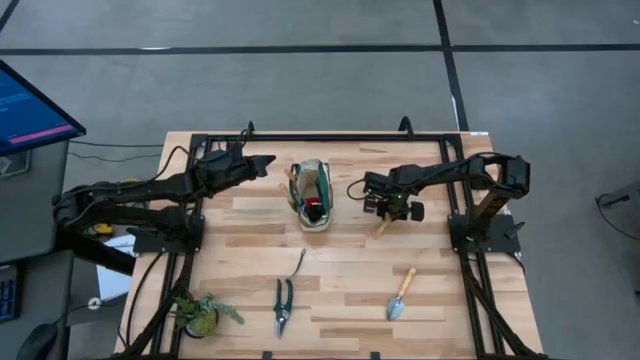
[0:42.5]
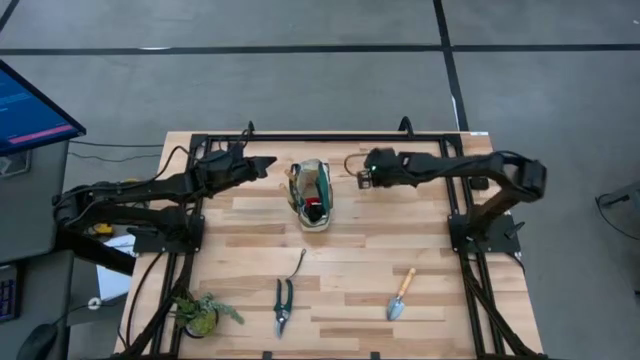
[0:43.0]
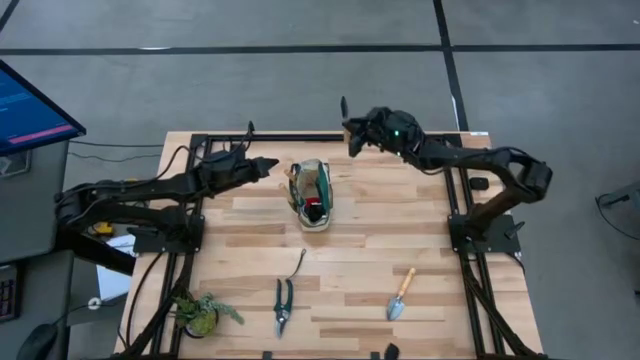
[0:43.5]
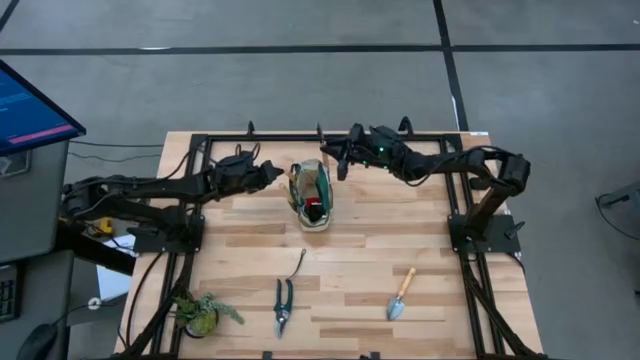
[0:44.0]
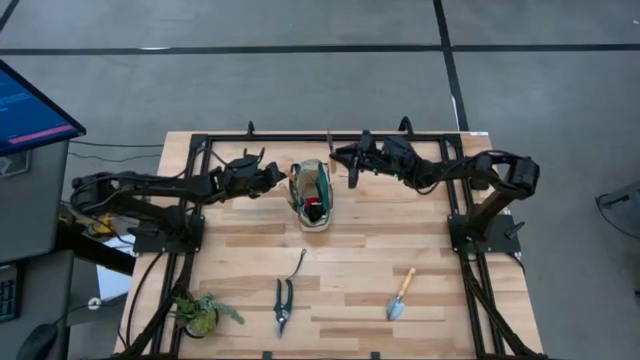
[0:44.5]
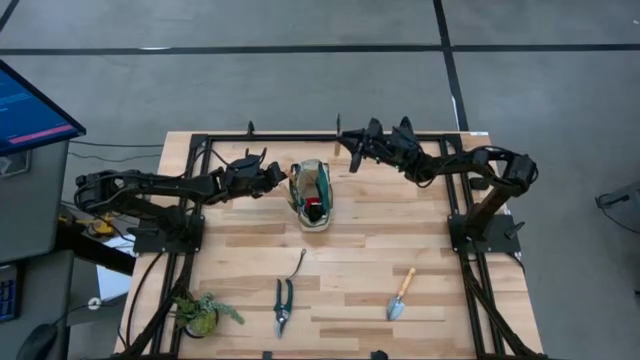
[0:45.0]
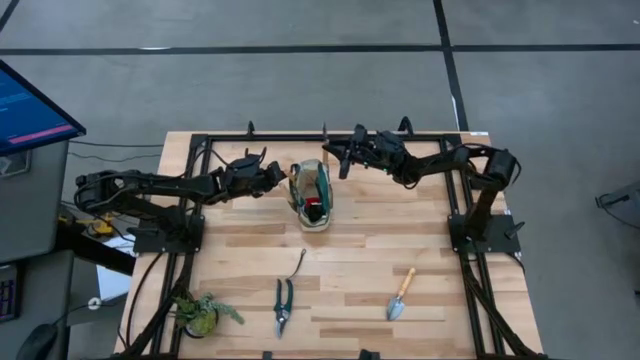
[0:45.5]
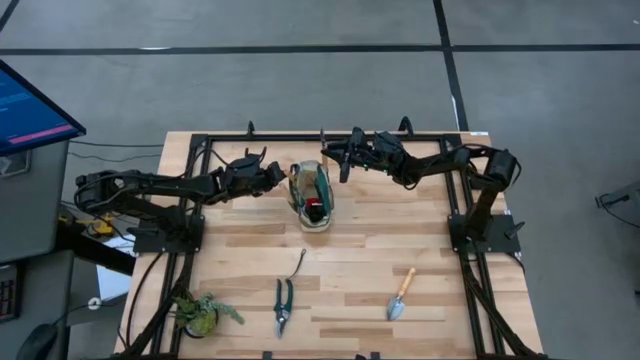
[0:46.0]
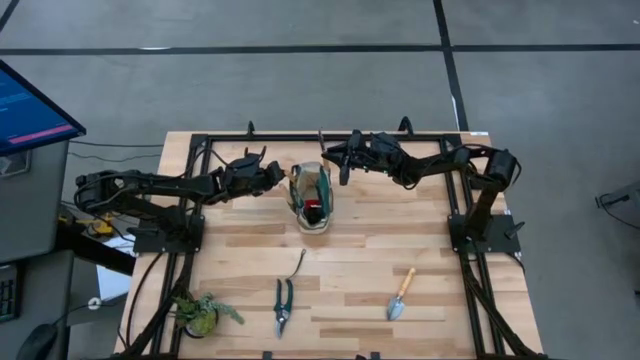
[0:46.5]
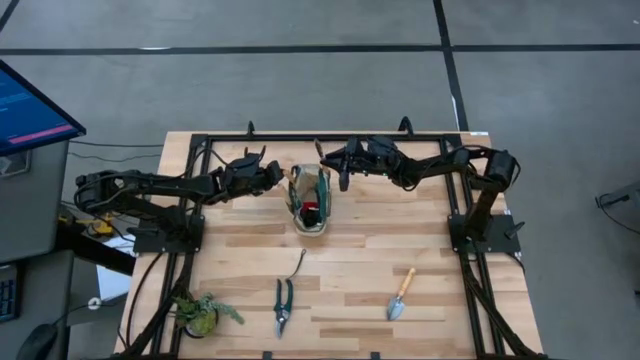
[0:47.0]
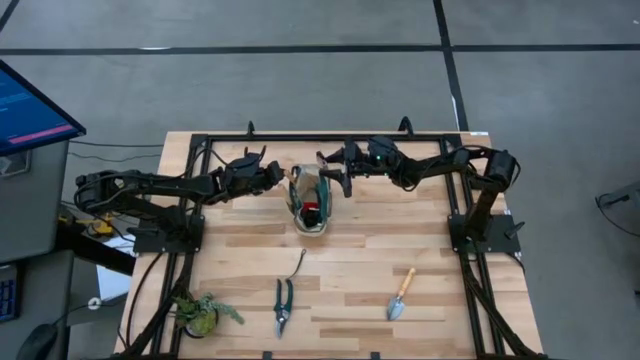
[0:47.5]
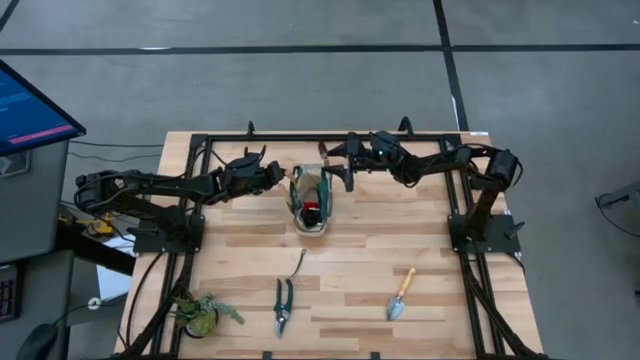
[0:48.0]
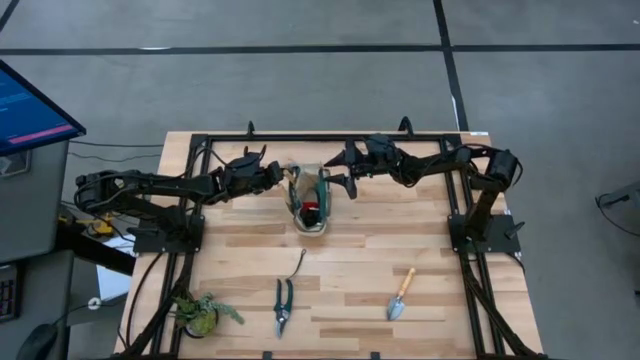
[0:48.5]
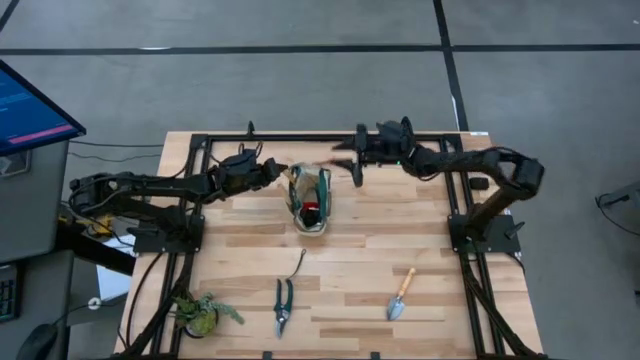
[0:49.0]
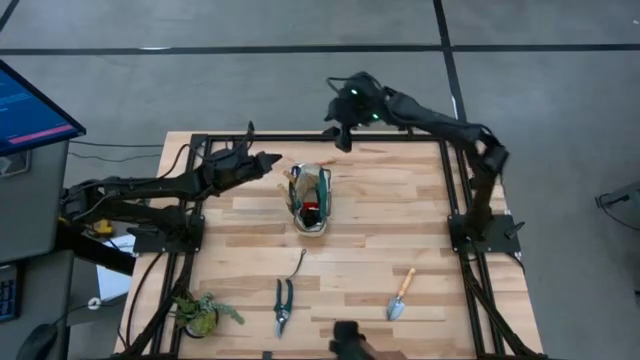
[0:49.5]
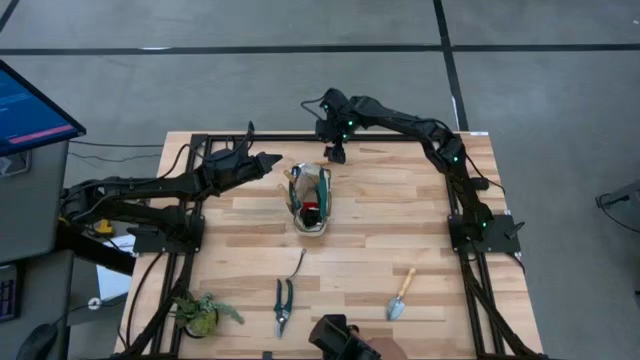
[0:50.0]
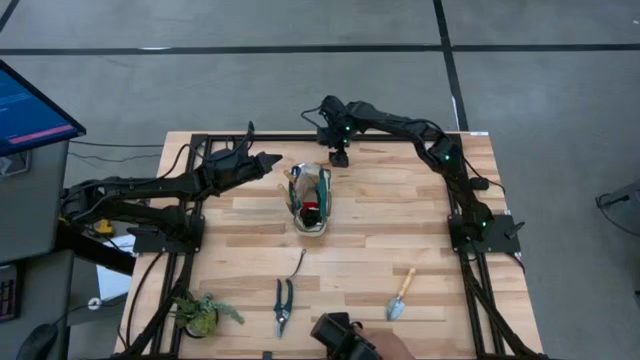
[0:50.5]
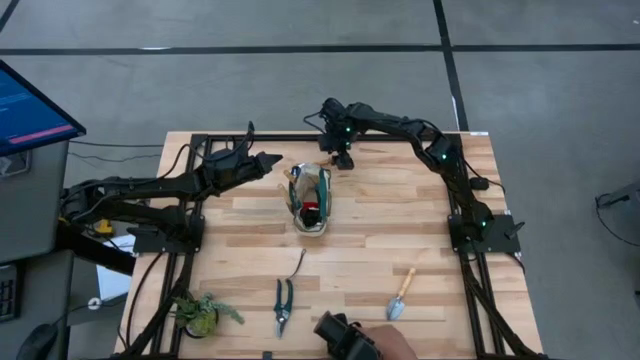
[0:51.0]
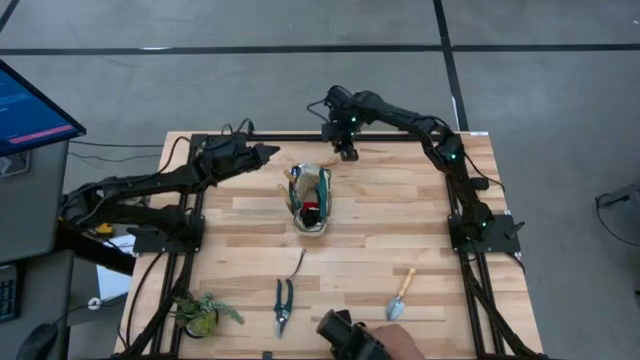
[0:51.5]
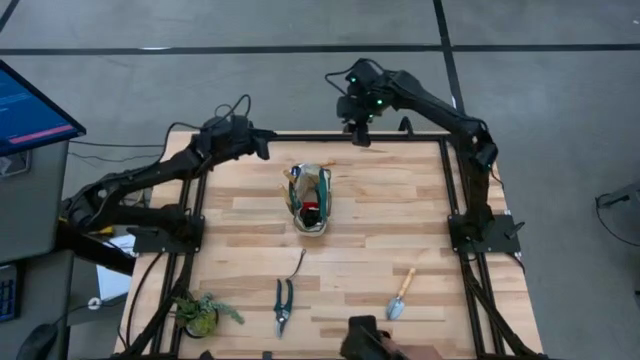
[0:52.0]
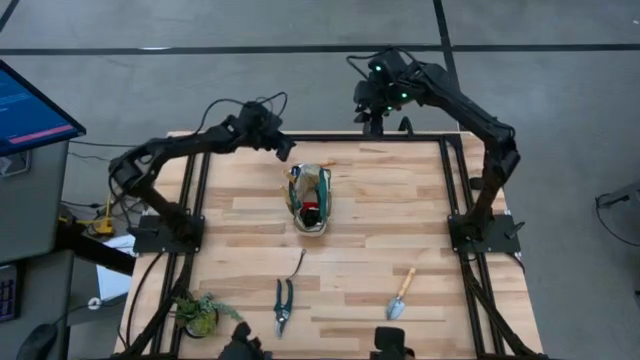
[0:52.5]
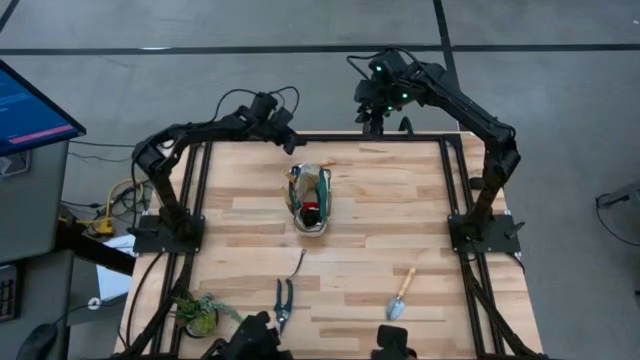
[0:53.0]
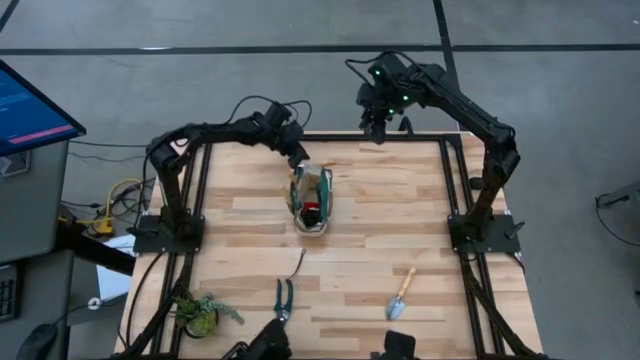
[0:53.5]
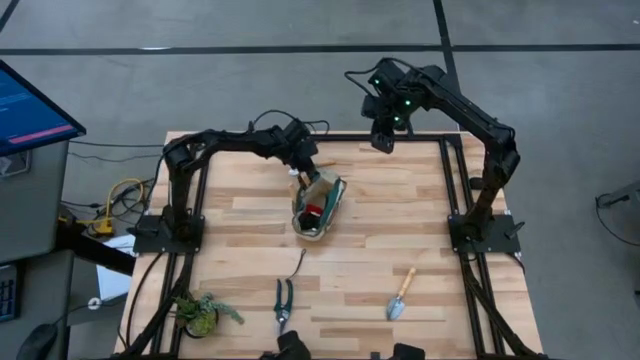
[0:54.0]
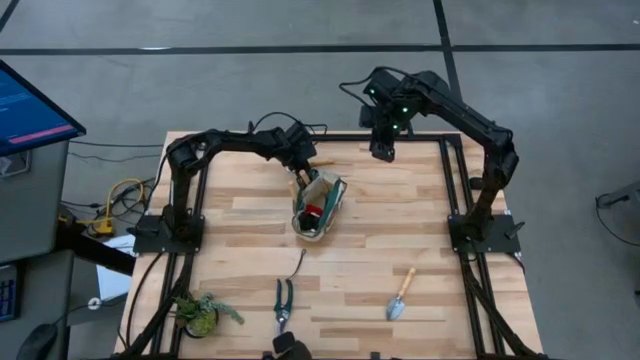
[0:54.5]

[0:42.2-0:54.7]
Task: Pick & Place Garden tools in Gardening bag
Put the top brown trowel into the white gardening bag

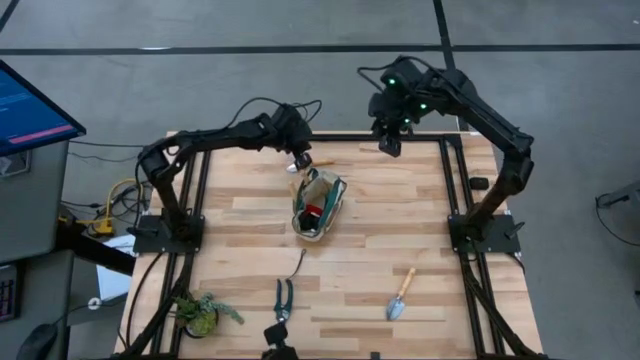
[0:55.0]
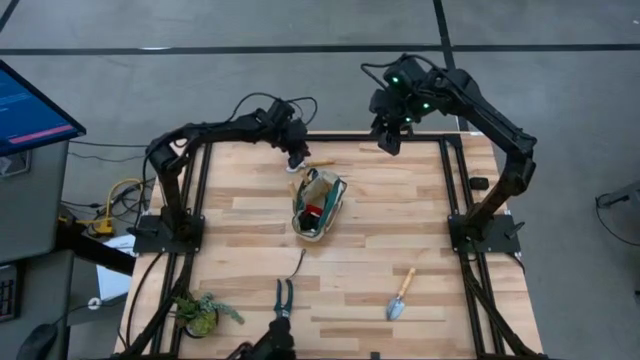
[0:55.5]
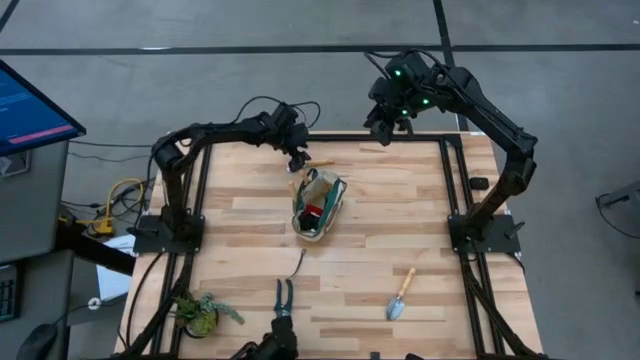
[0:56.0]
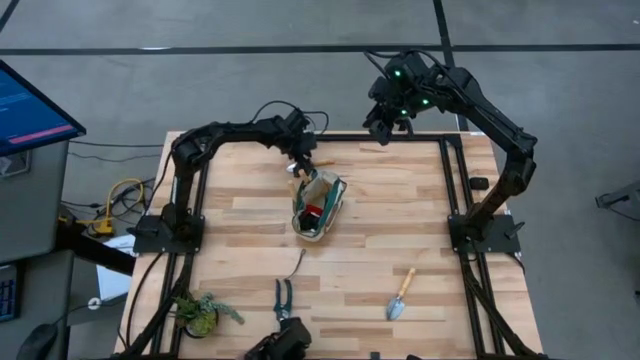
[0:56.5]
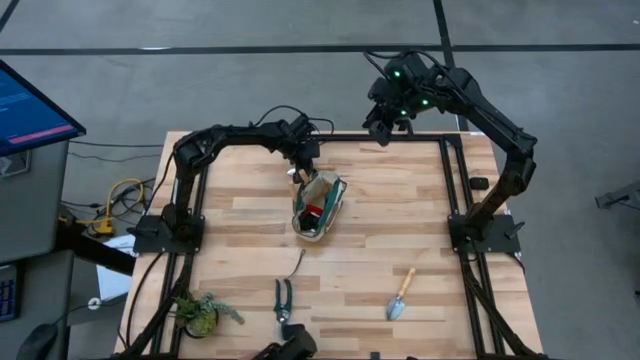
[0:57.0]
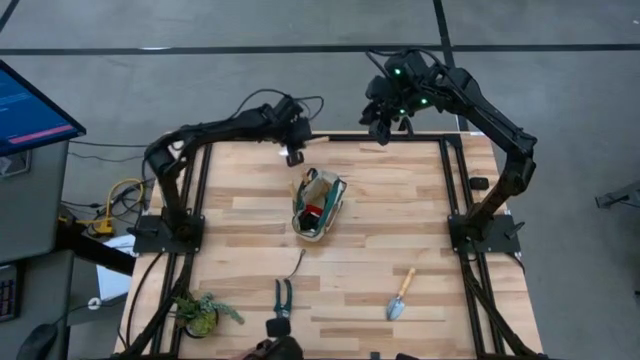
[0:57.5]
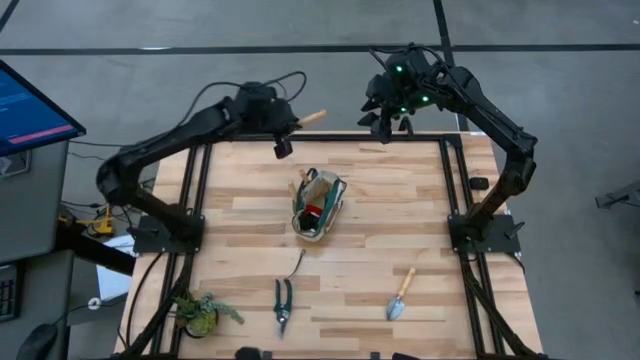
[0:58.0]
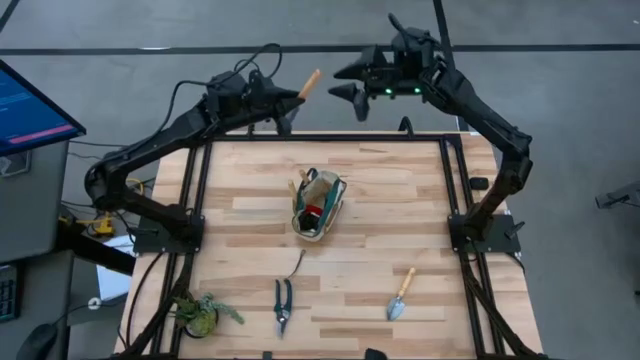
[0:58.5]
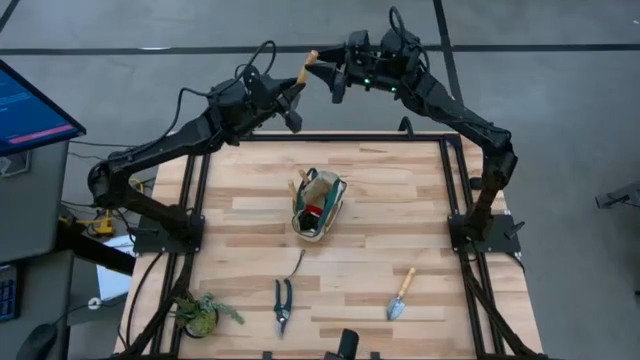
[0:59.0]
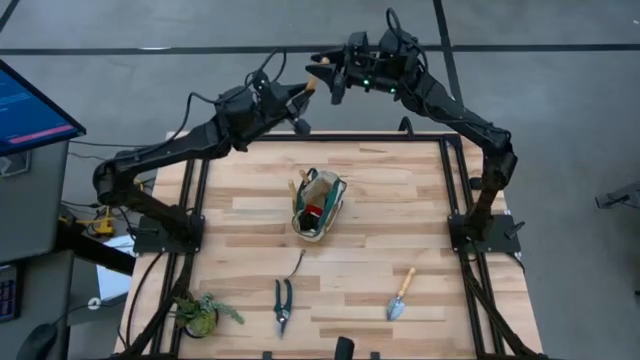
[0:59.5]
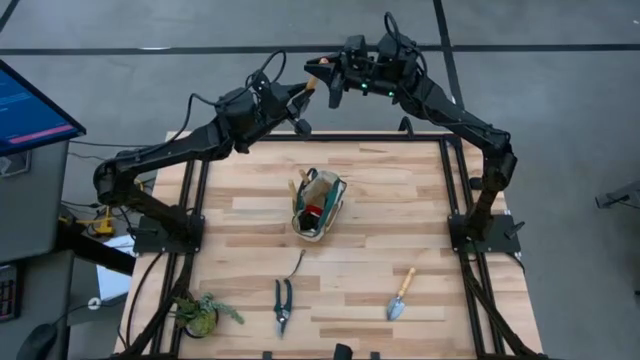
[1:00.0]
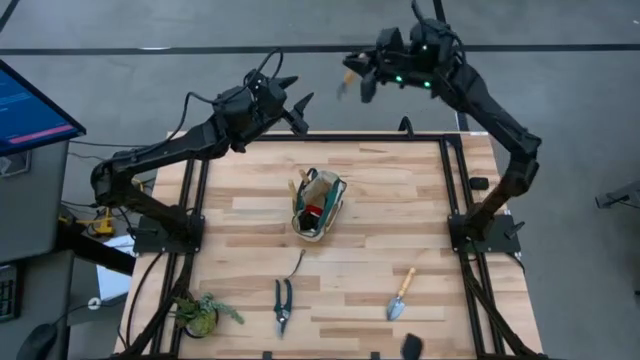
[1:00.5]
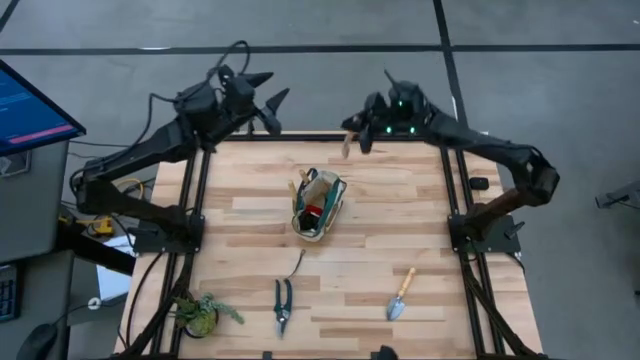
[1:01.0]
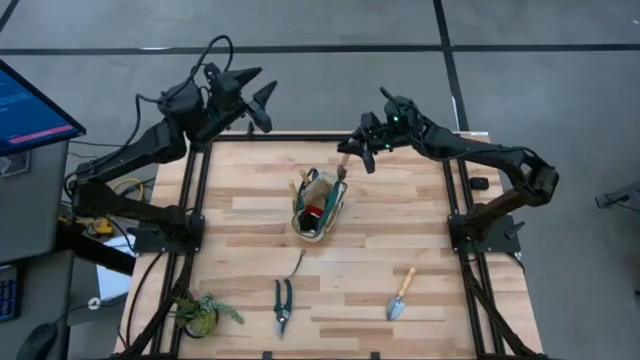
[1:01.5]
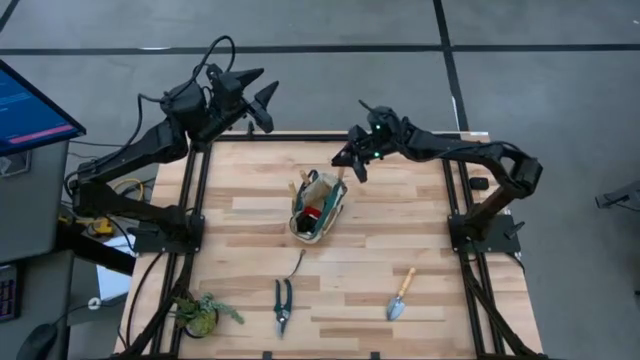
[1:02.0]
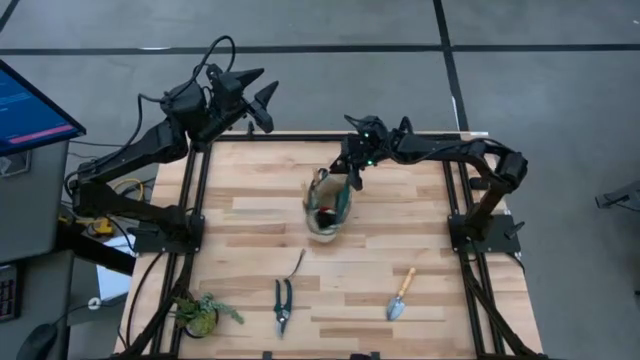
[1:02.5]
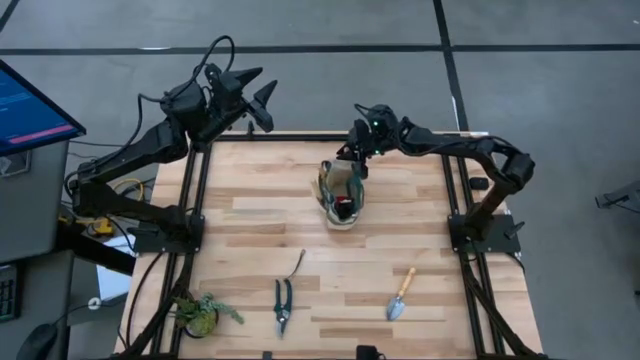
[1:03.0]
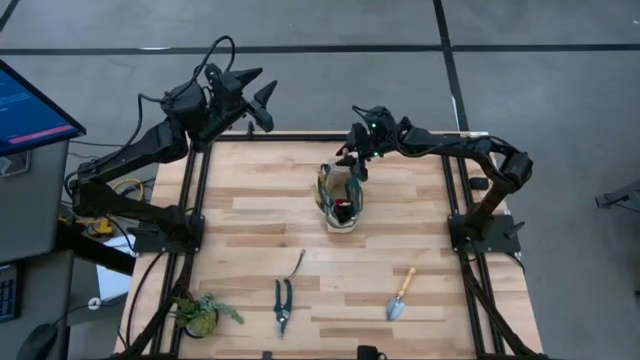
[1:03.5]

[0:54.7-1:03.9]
Put the top brown trowel into the white gardening bag
